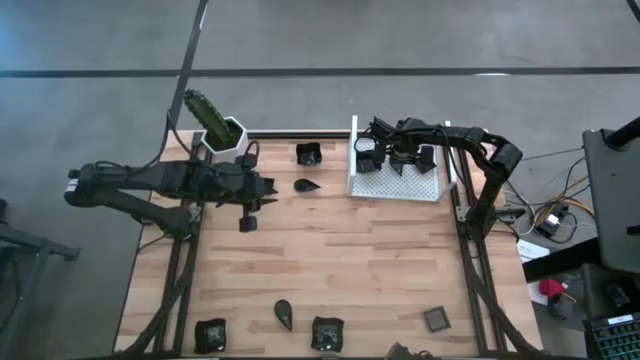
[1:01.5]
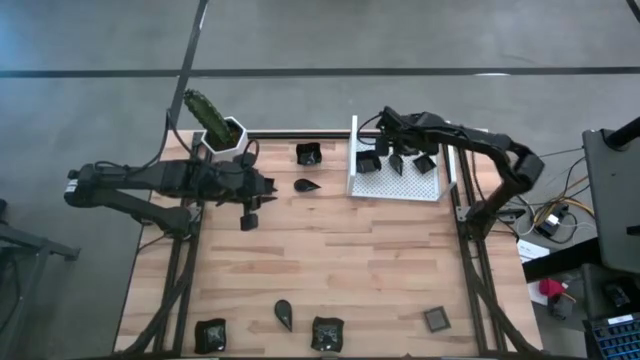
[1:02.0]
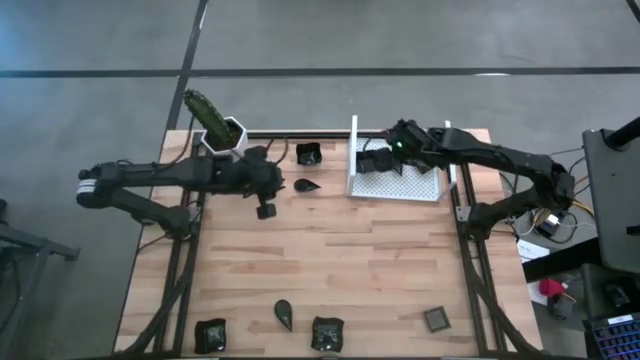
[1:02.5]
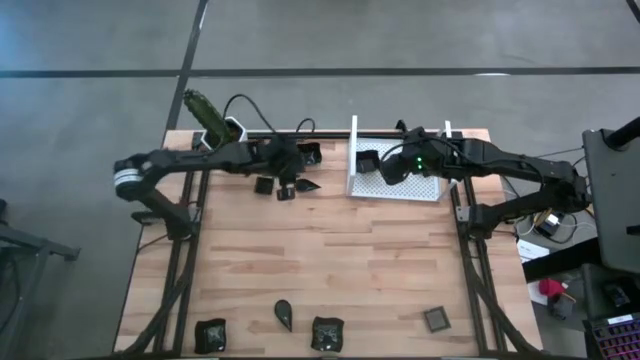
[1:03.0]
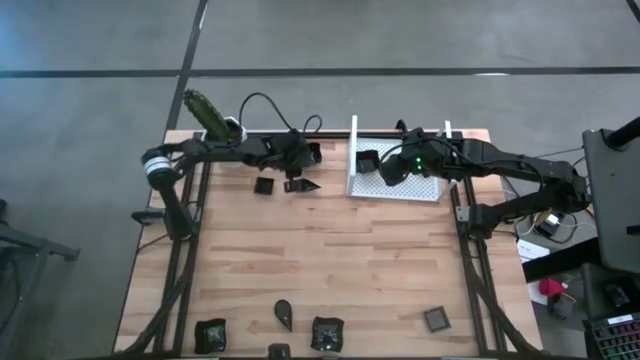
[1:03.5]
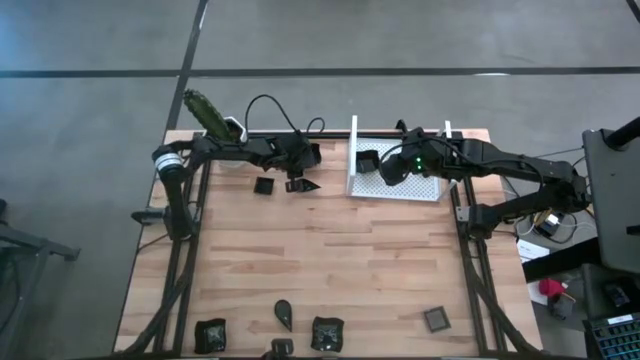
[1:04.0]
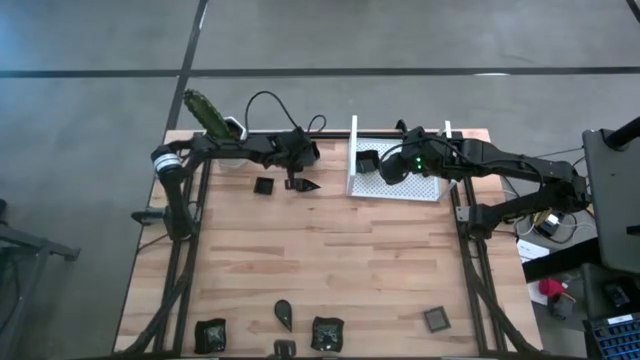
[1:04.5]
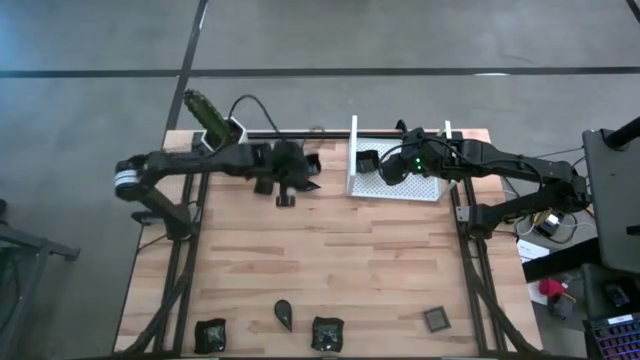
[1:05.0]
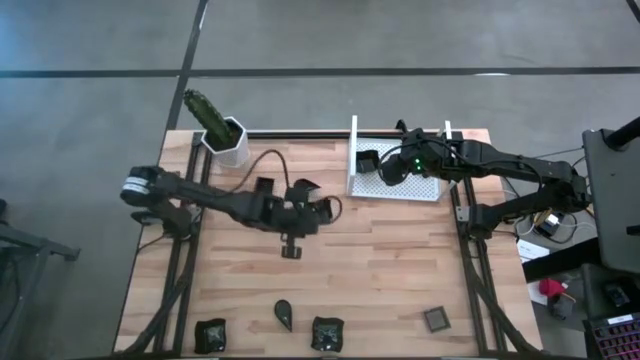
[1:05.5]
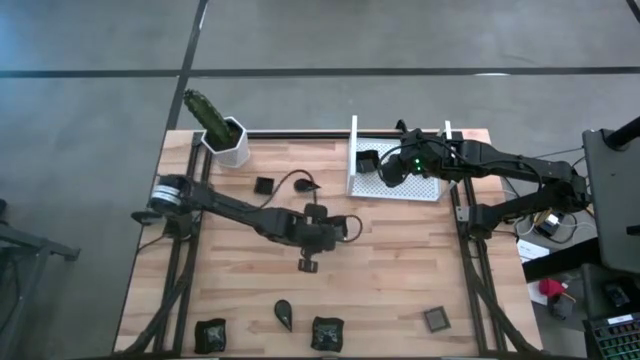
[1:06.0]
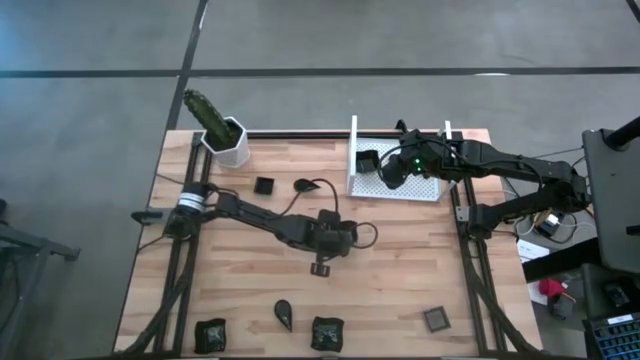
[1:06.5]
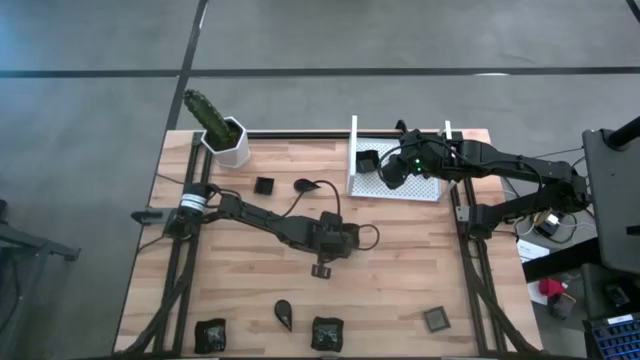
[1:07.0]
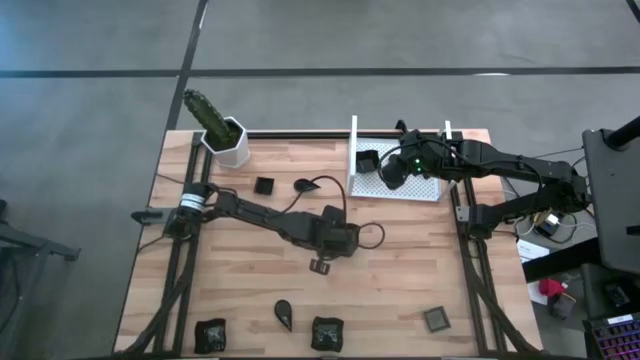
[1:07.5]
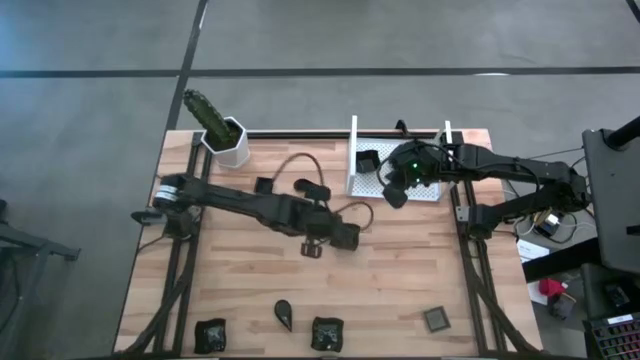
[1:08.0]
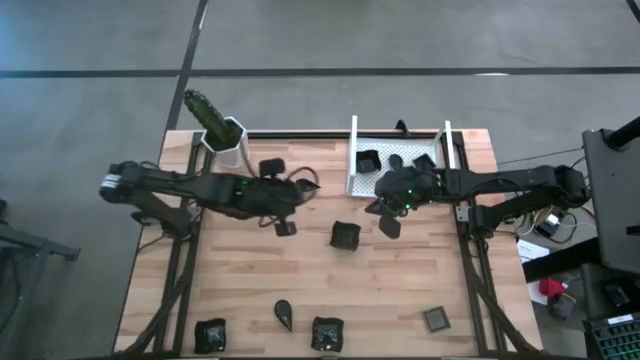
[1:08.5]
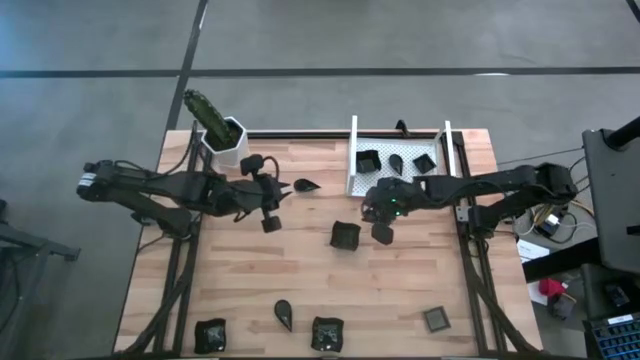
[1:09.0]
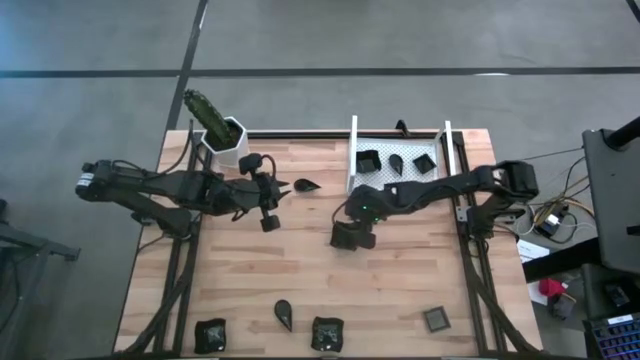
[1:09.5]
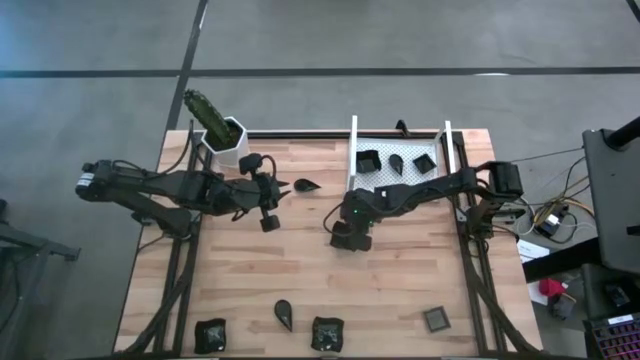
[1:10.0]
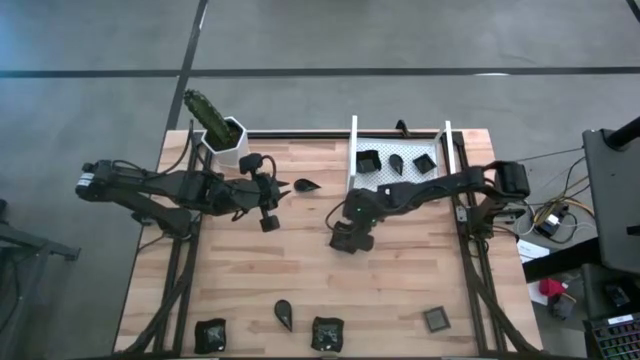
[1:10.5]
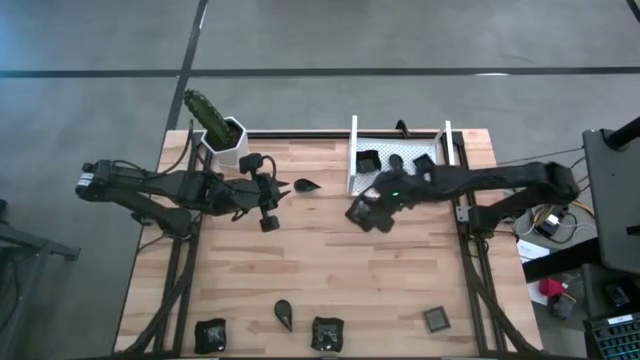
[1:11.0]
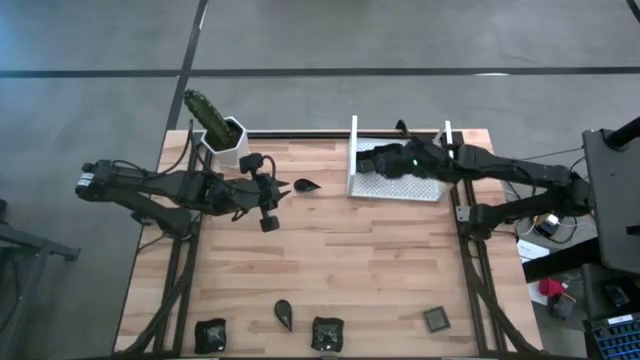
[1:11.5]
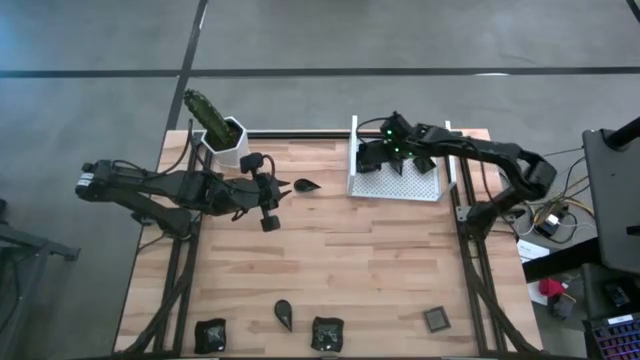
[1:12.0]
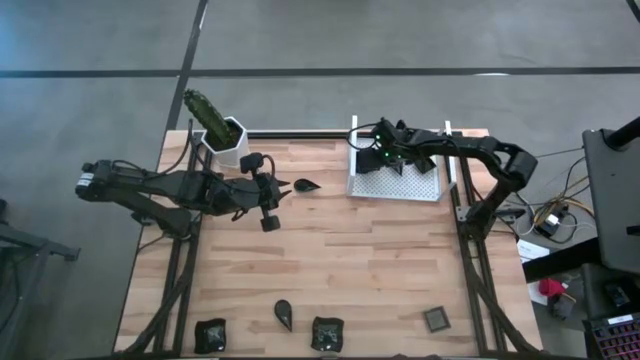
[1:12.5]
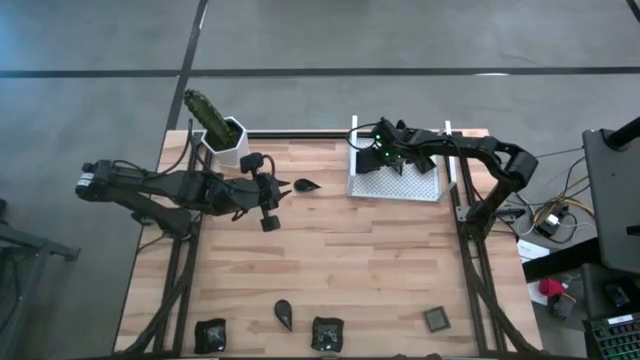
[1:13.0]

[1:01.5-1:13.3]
Task: Pick & Place Mini shaped plates
Stack the black distorted square plate on top of the other black distorted square plate on the shelf

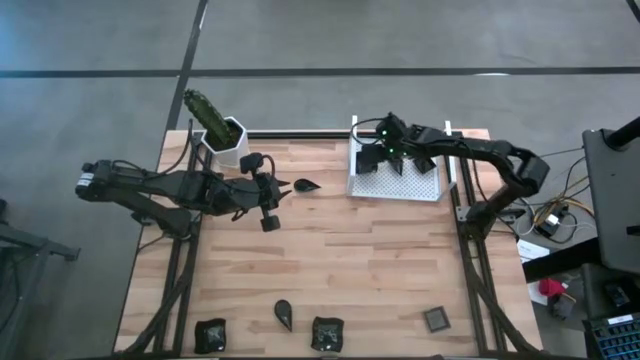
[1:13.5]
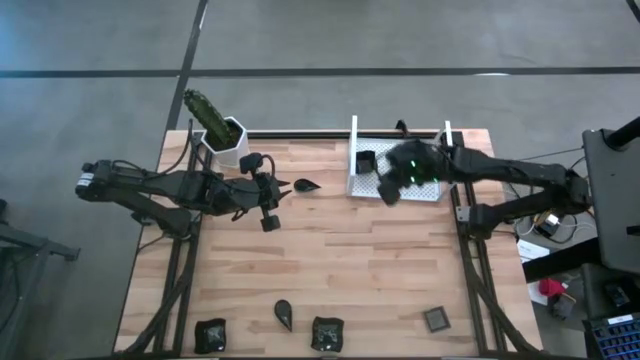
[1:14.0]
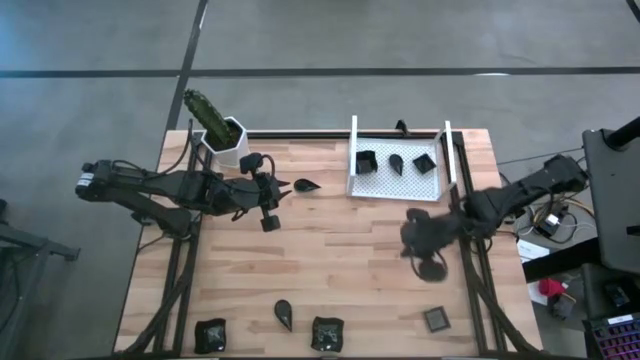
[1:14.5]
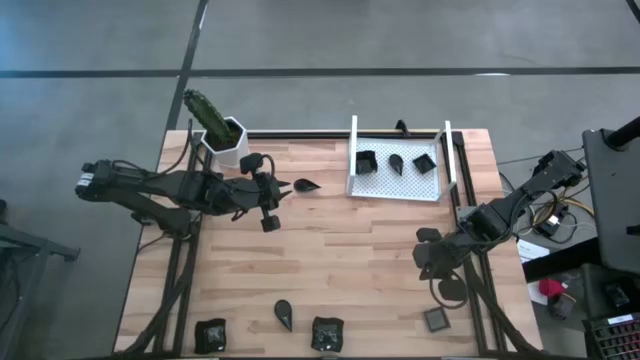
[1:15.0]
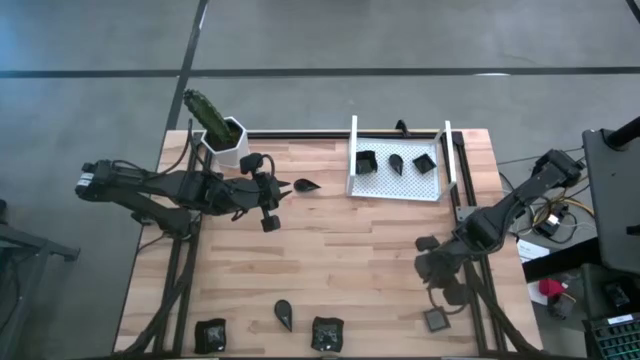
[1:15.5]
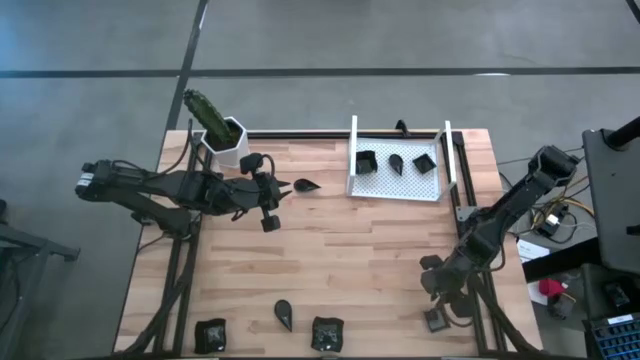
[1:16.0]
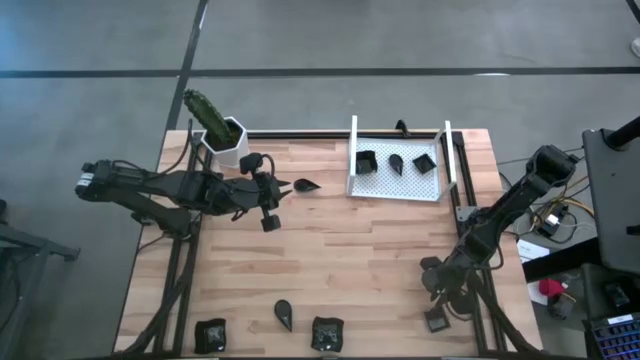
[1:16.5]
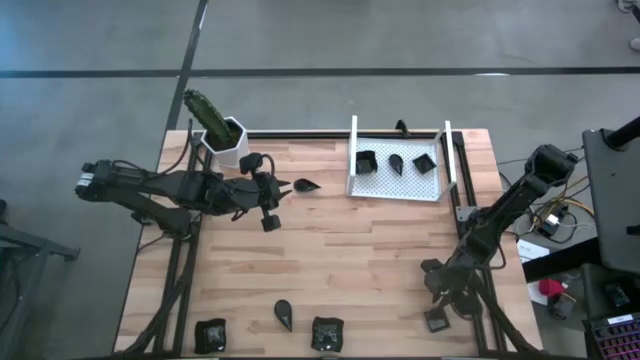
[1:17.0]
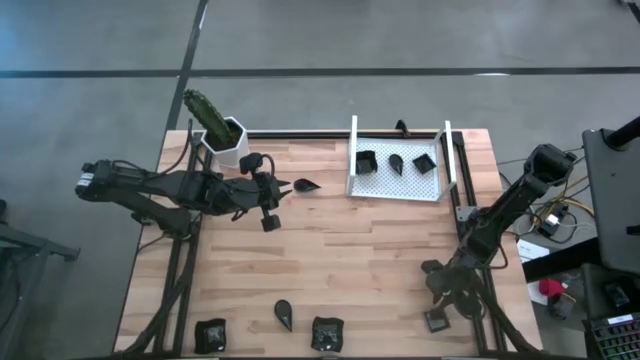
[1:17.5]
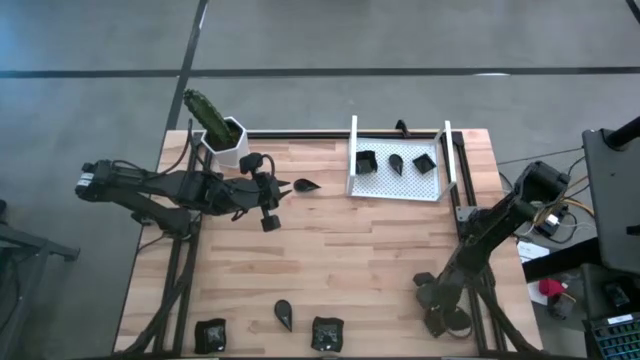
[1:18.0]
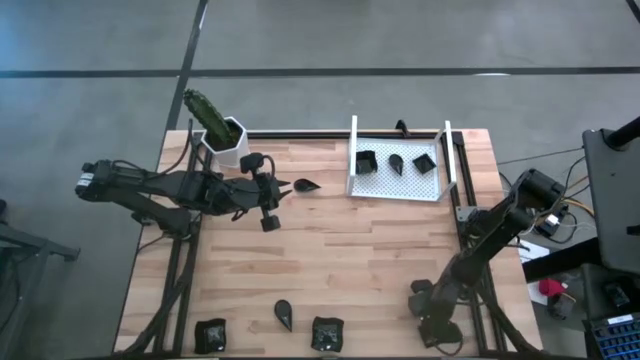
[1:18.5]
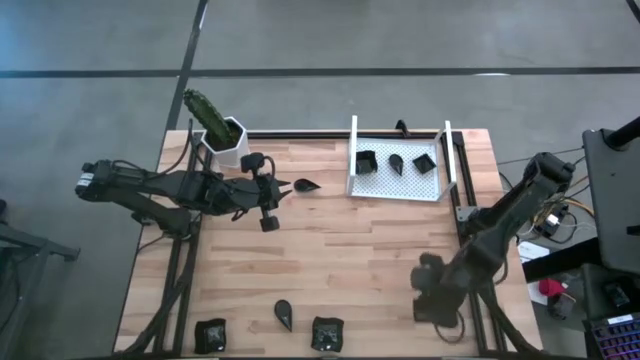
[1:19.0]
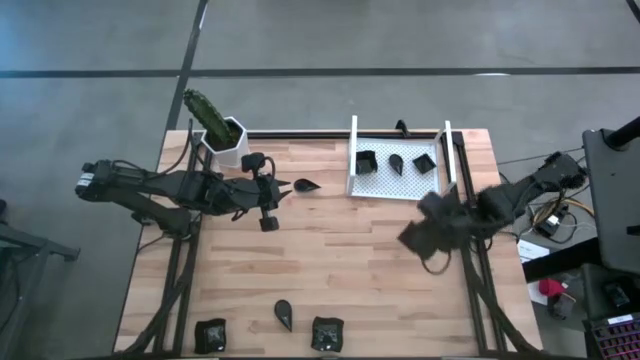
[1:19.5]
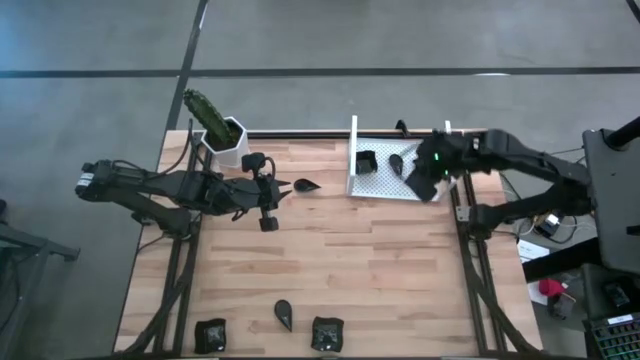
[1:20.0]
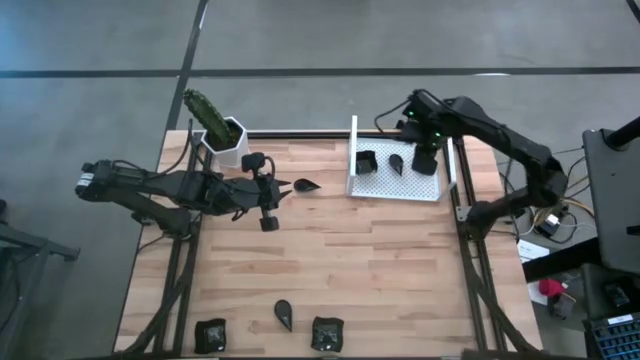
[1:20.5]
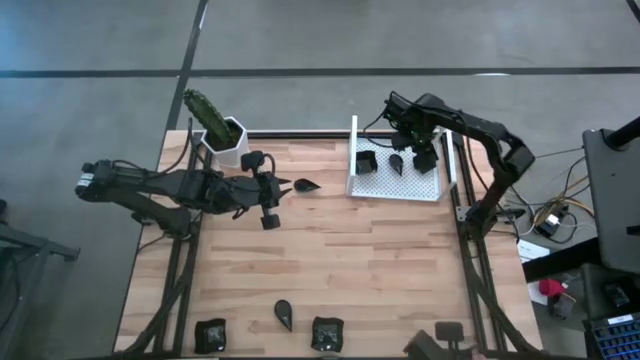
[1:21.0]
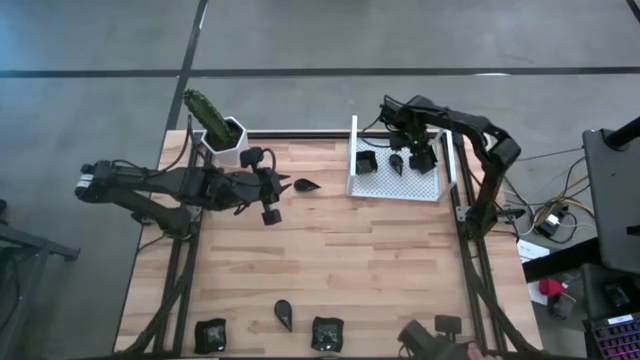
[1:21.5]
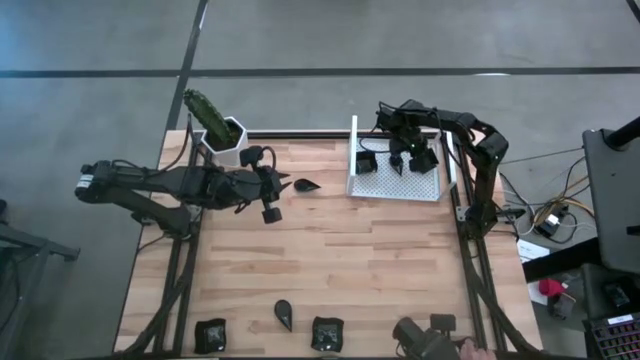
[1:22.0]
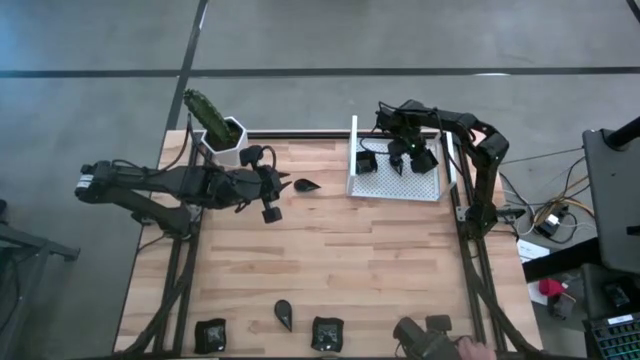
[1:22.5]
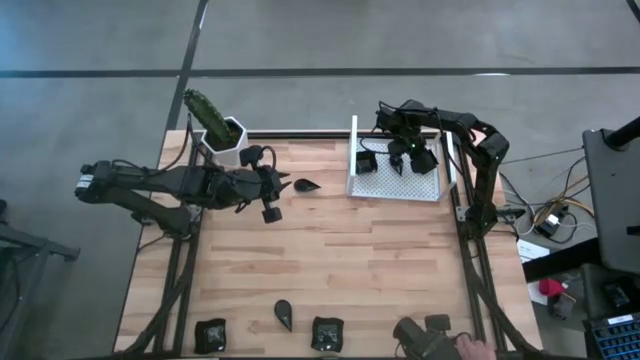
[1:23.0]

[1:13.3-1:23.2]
Stack the black square plate on top of the other black square plates on the shelf
